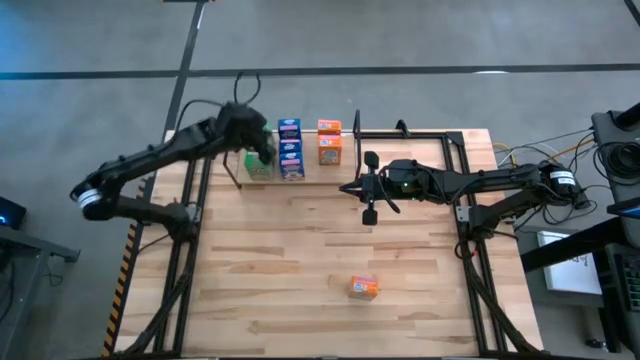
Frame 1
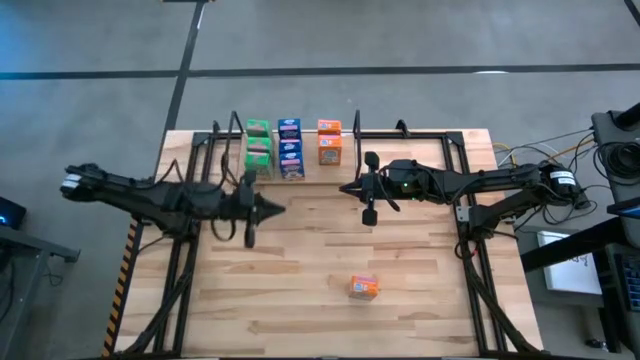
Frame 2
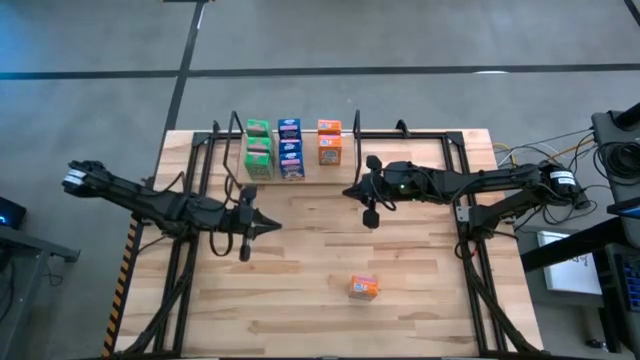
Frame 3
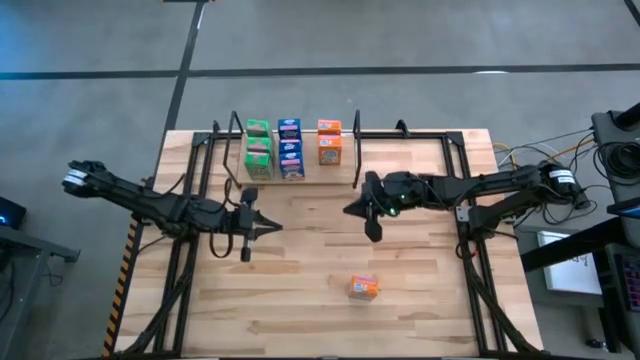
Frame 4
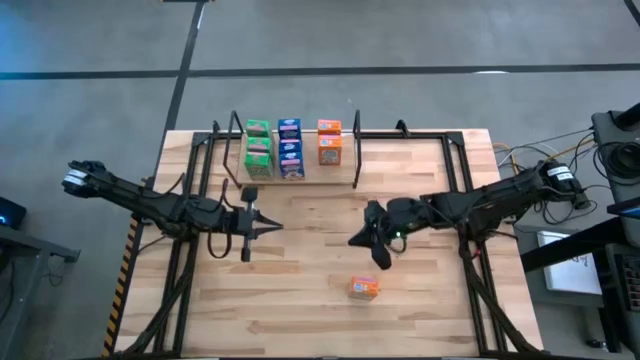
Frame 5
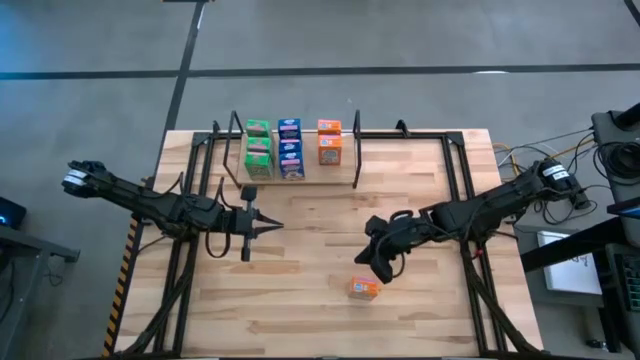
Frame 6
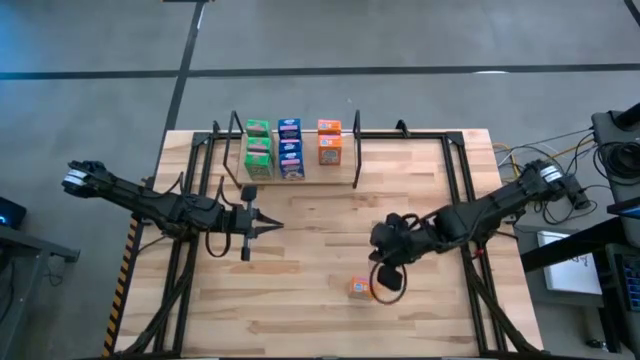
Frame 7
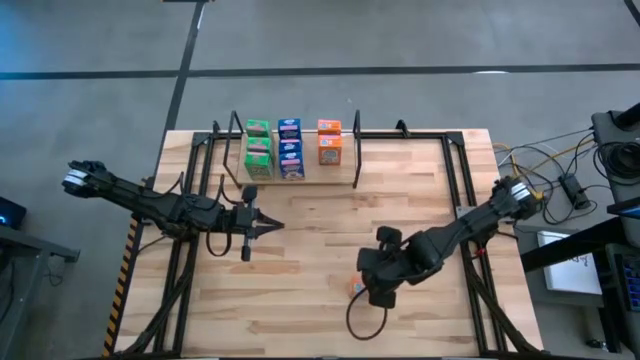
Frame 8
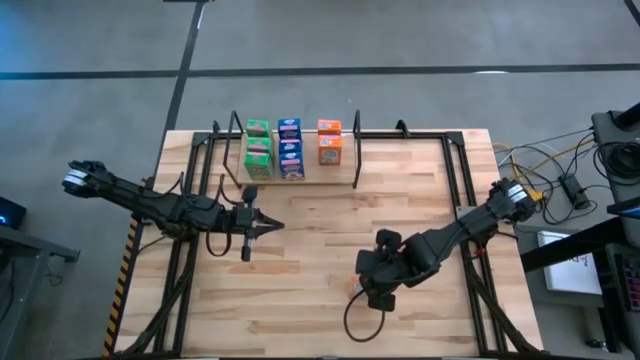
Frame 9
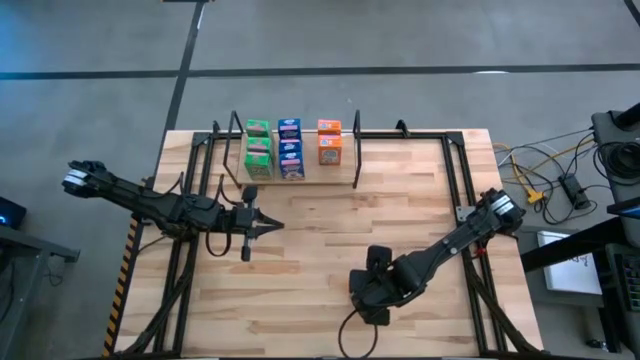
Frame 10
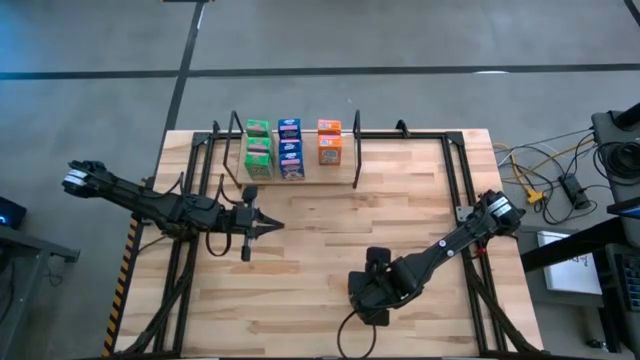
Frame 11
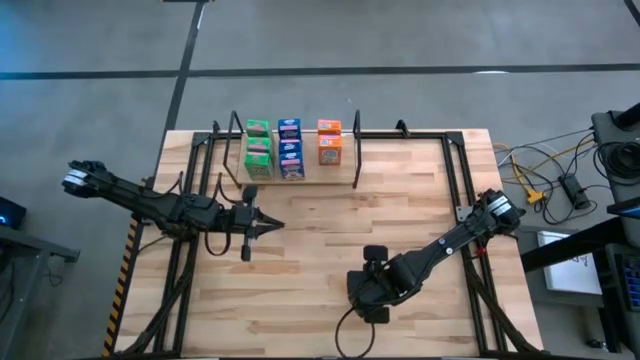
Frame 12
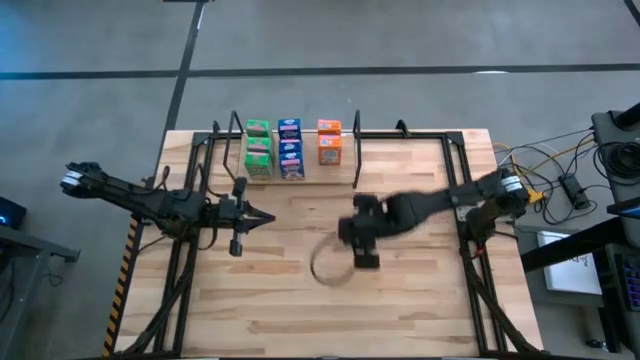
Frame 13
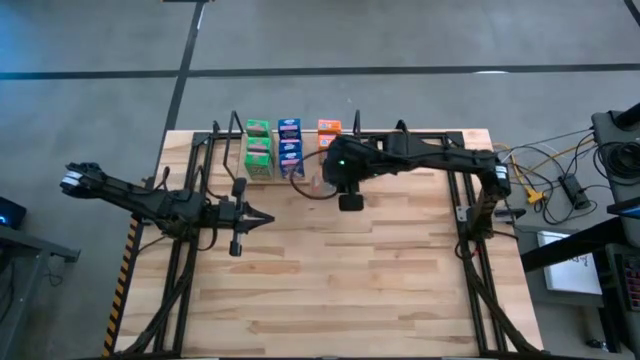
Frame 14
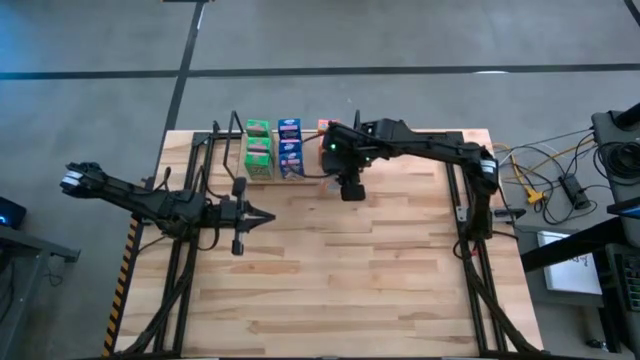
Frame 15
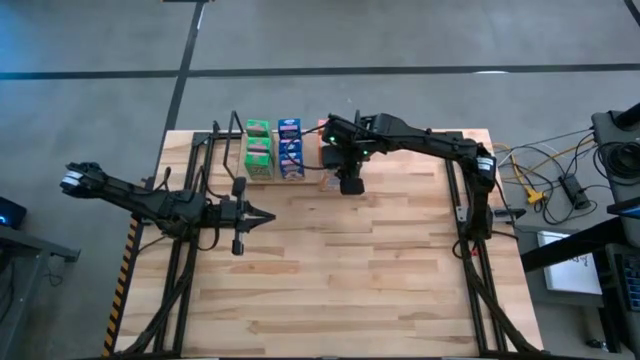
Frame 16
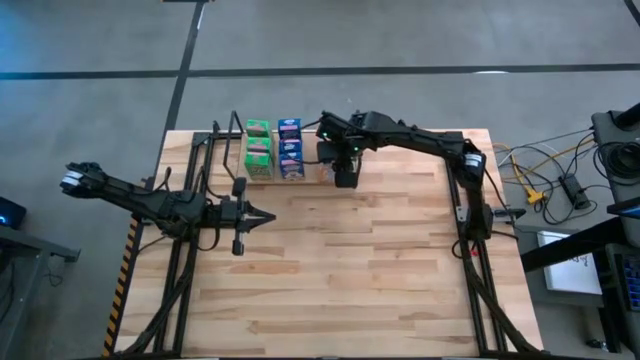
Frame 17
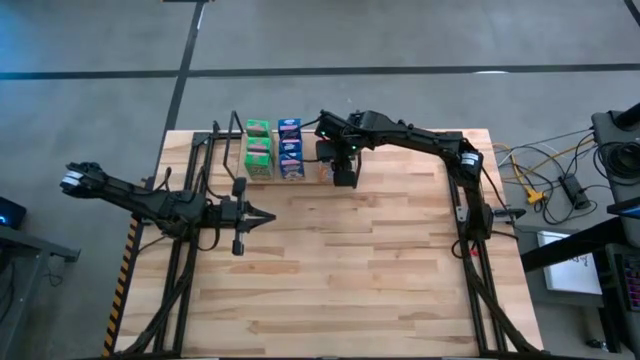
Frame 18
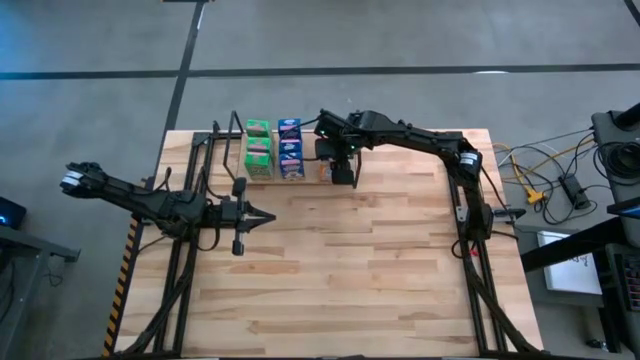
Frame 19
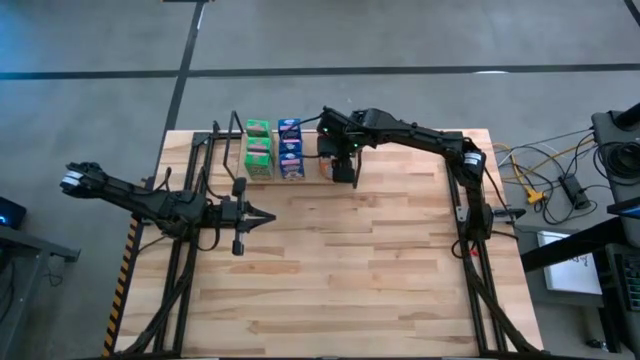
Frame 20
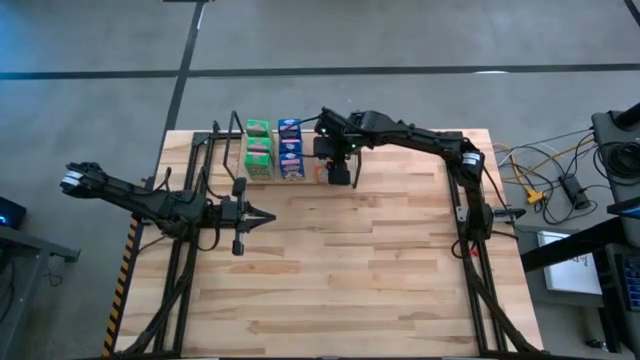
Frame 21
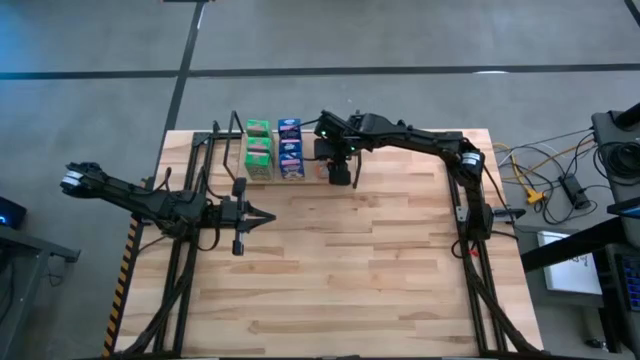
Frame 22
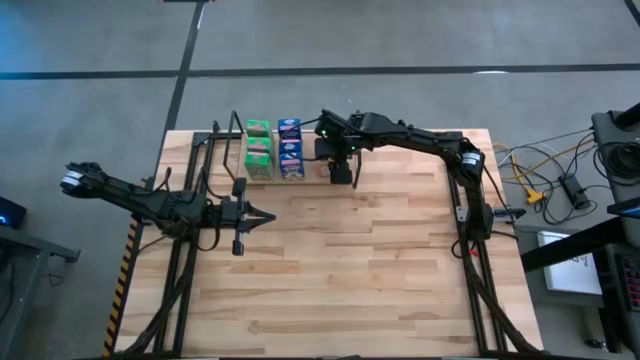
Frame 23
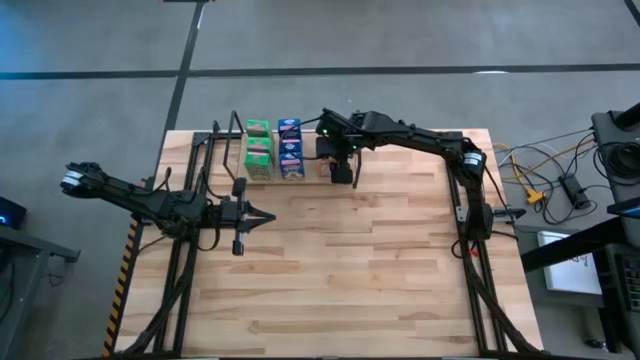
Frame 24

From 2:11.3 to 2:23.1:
Task: Stack cereal on shelf
Put the orange cereal box on the shelf aligned with the other orange cereal box

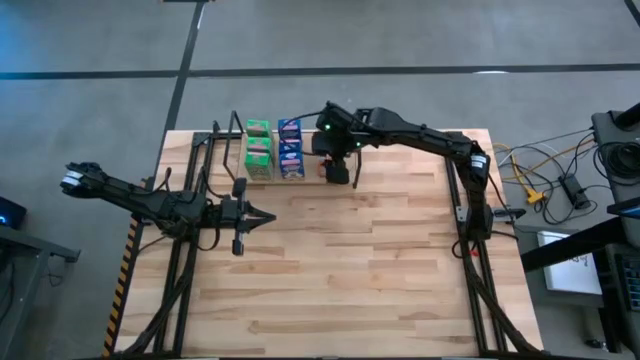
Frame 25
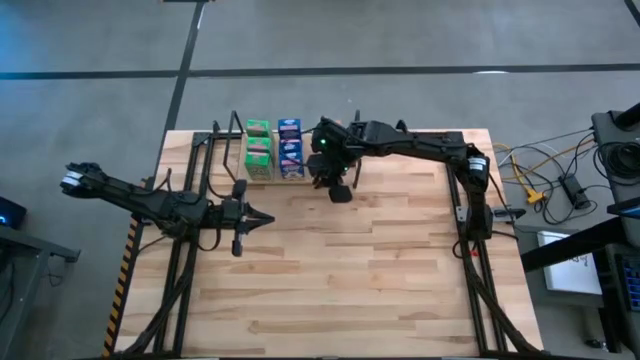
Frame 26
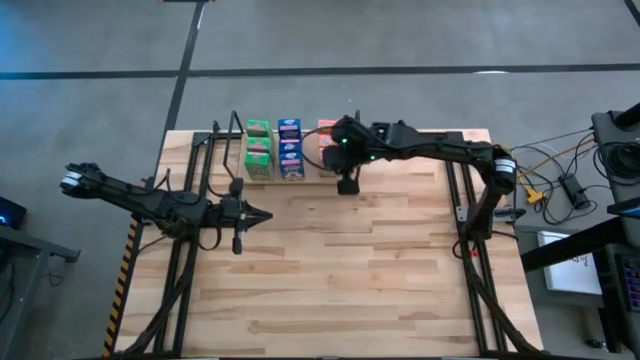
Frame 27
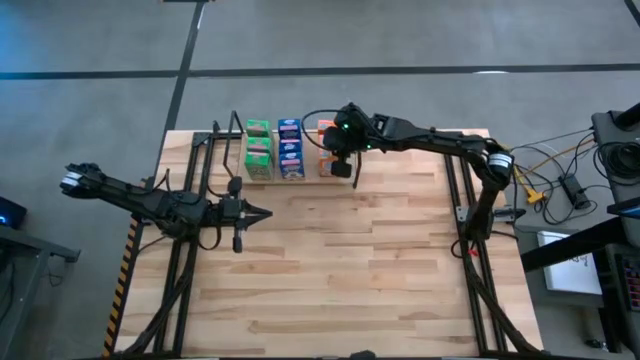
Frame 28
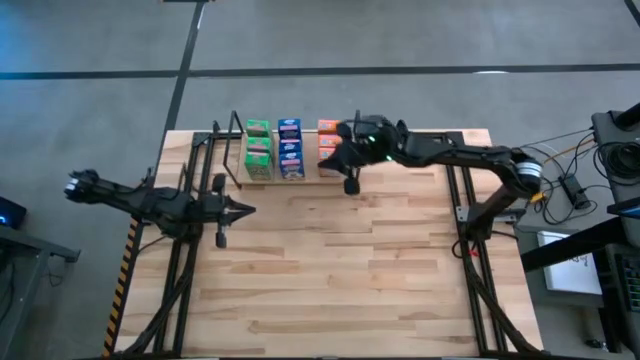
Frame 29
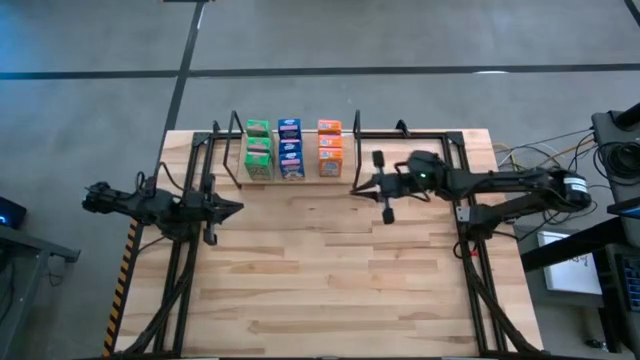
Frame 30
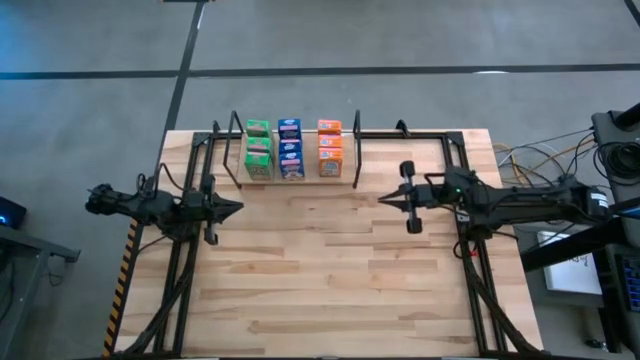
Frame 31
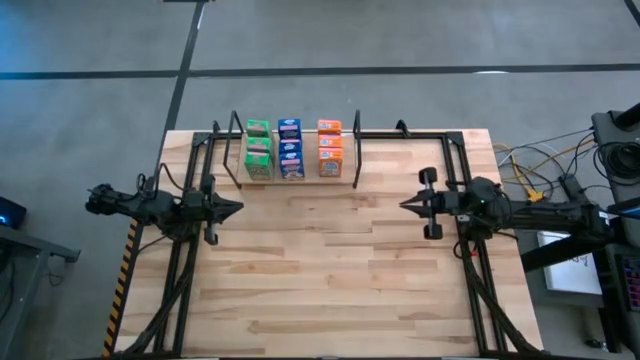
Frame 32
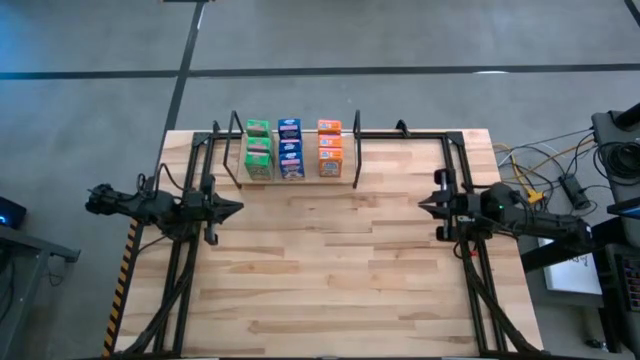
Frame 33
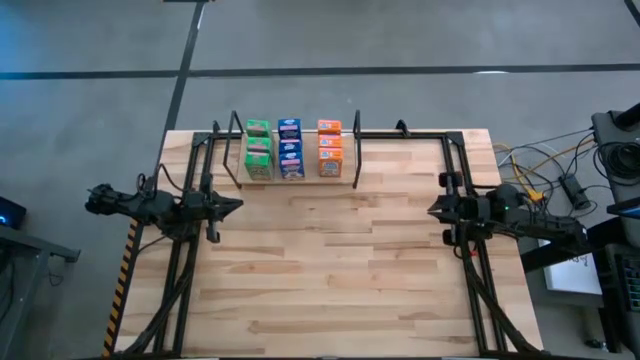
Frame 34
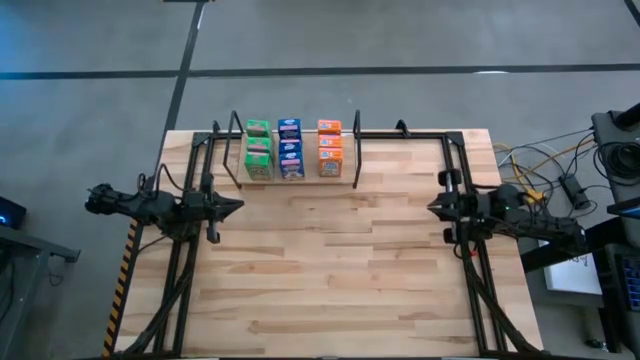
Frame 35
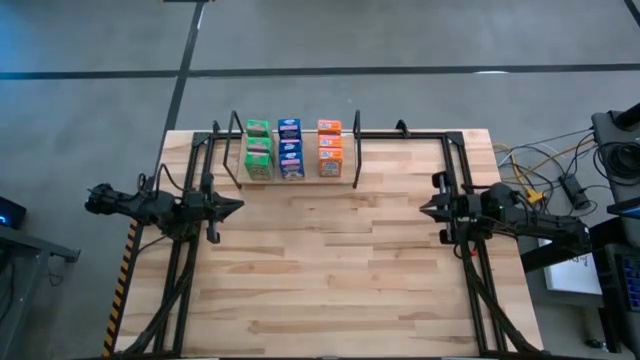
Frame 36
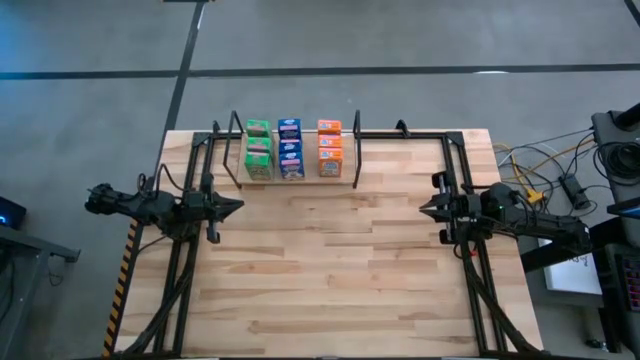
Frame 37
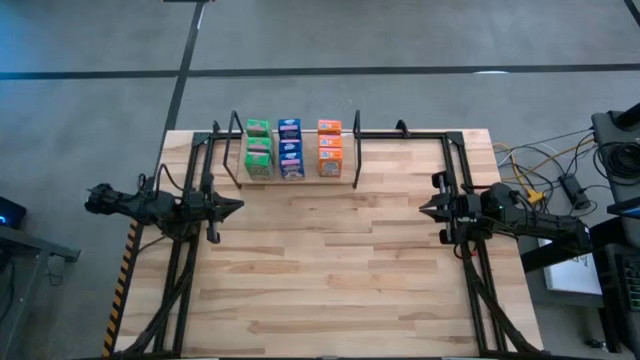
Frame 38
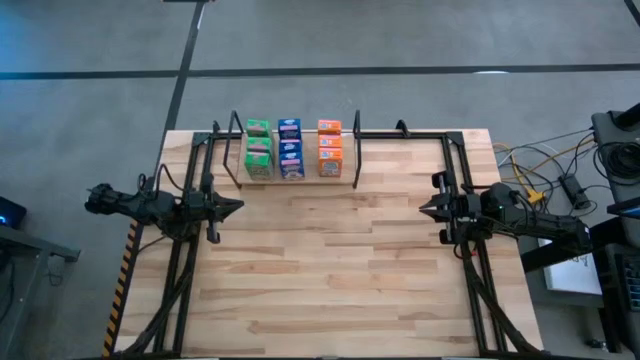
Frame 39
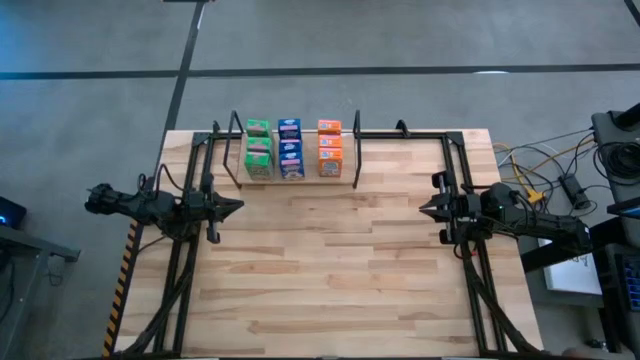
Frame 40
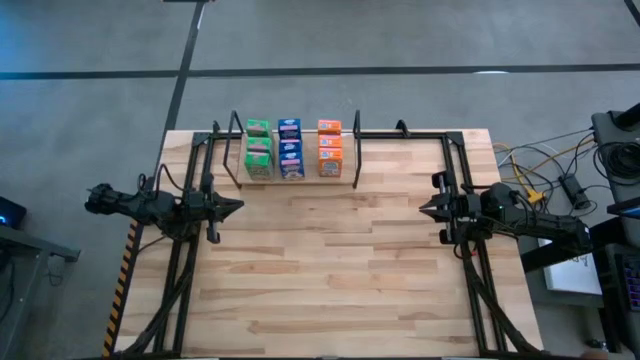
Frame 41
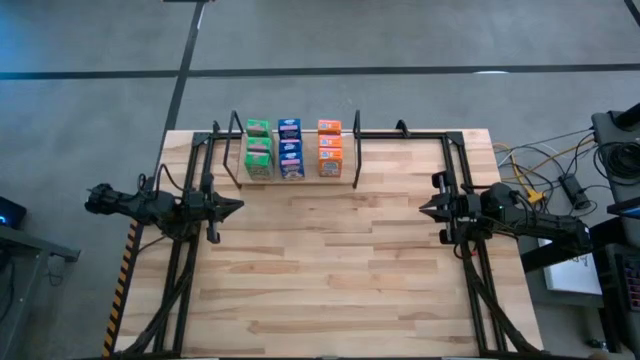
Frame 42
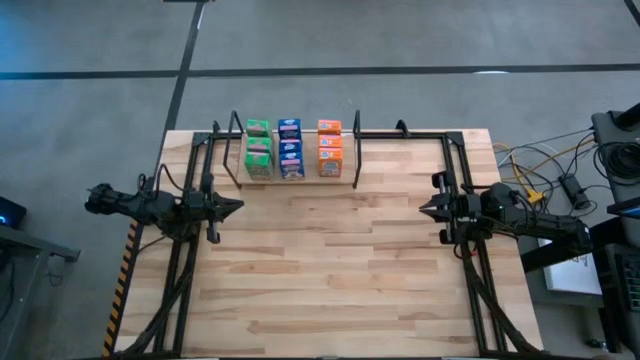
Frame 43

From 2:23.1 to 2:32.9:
Return to Home Position
